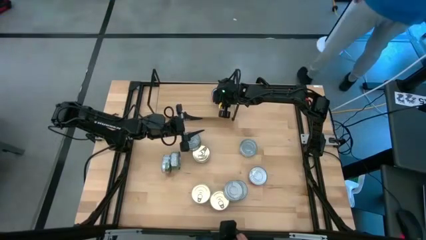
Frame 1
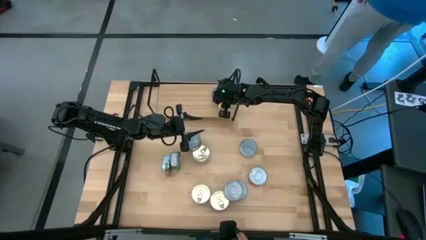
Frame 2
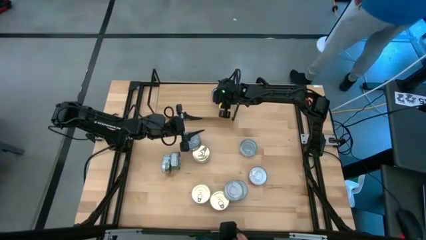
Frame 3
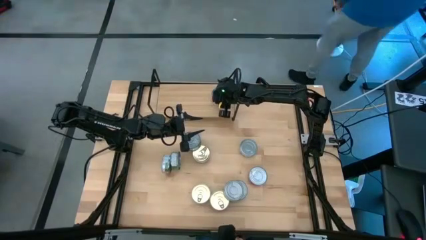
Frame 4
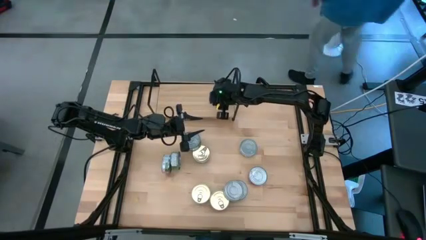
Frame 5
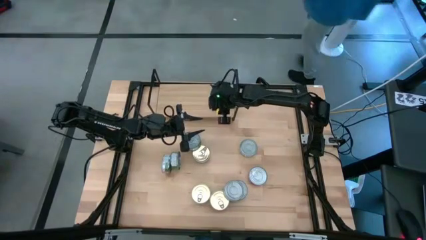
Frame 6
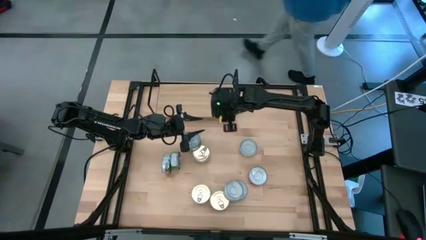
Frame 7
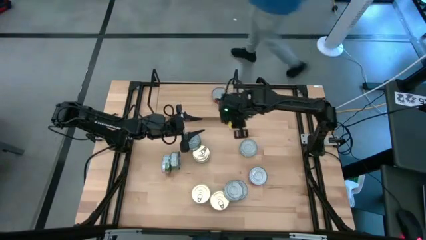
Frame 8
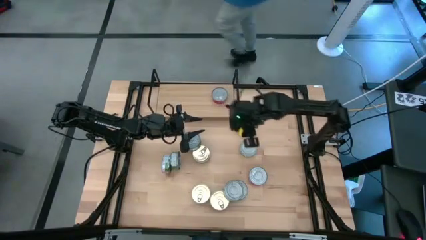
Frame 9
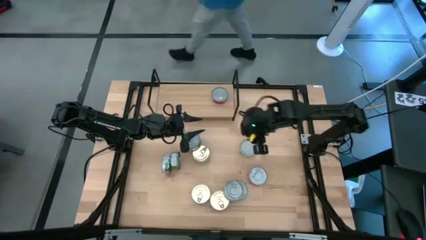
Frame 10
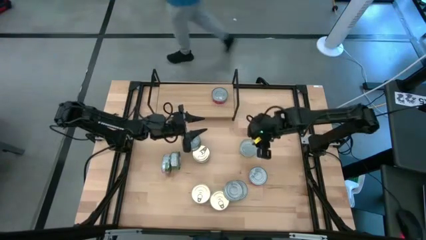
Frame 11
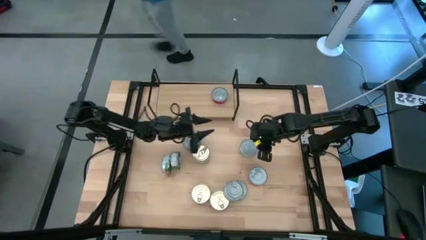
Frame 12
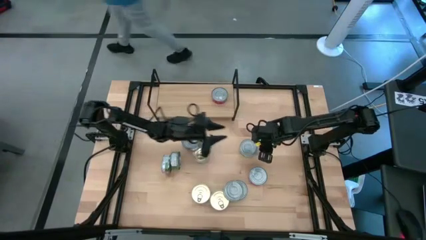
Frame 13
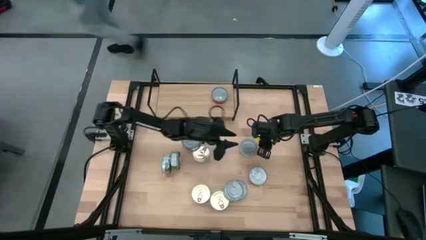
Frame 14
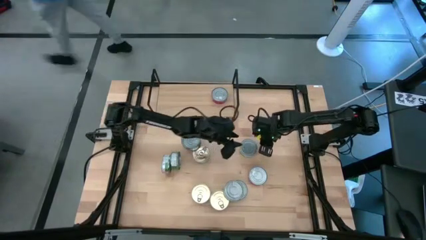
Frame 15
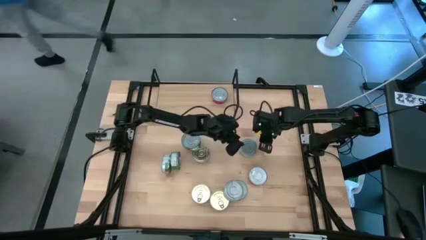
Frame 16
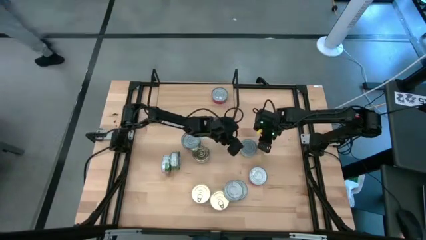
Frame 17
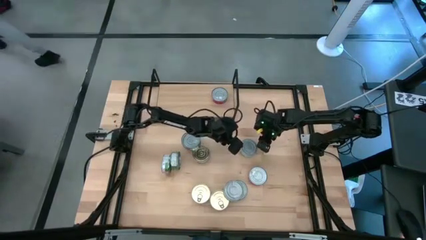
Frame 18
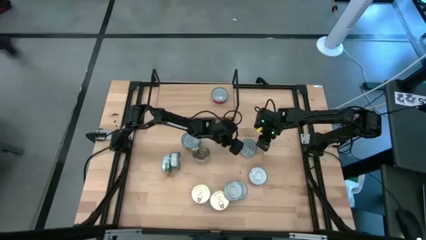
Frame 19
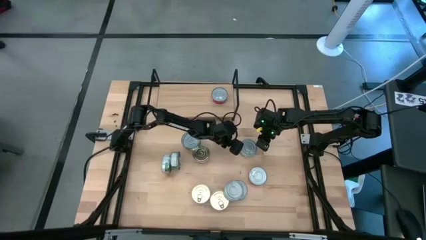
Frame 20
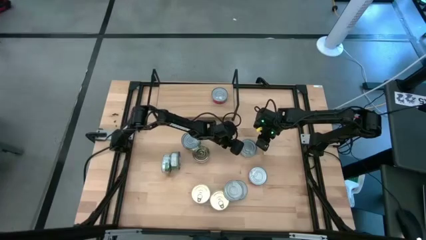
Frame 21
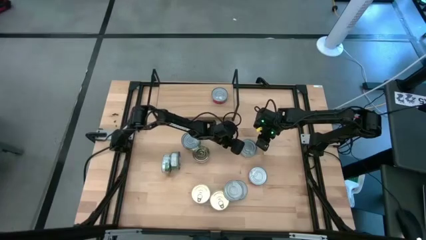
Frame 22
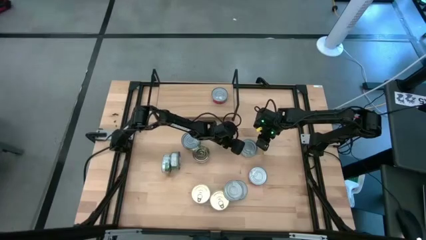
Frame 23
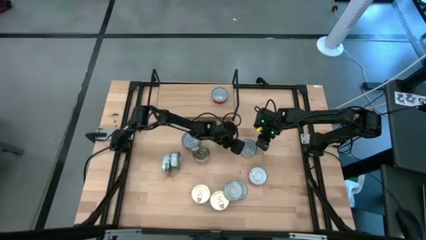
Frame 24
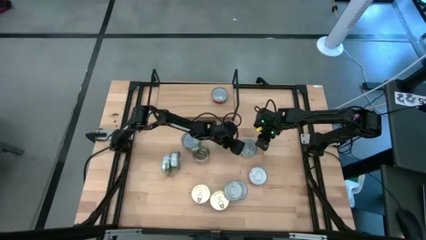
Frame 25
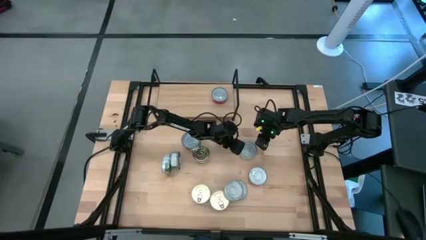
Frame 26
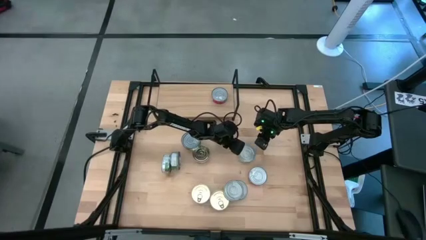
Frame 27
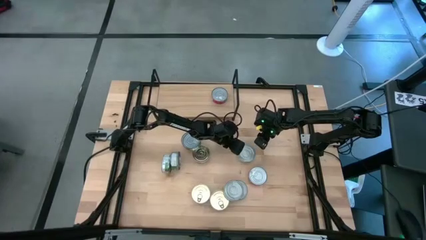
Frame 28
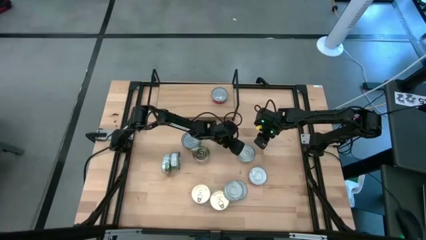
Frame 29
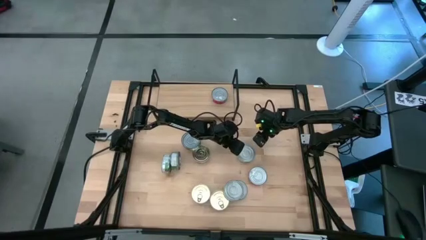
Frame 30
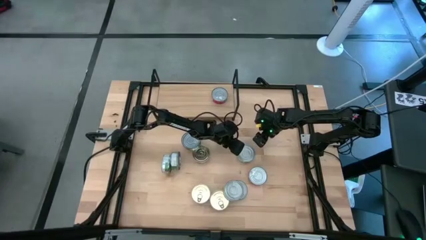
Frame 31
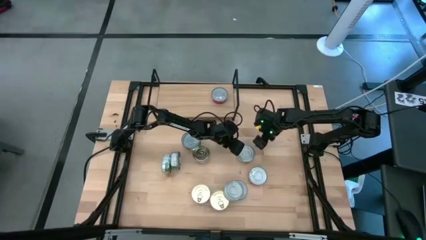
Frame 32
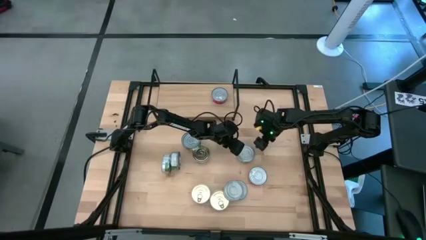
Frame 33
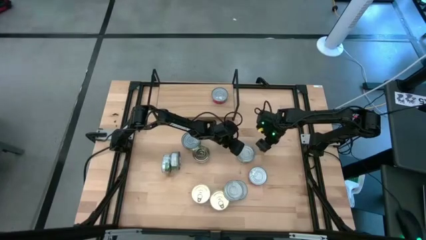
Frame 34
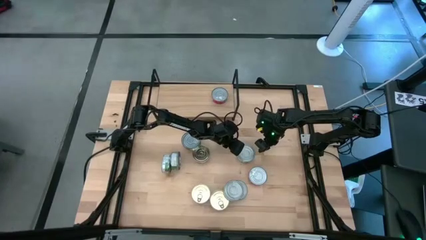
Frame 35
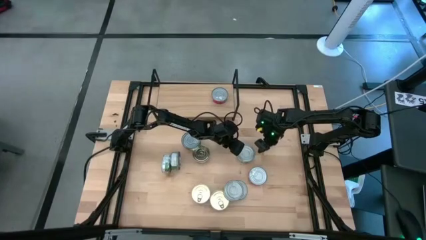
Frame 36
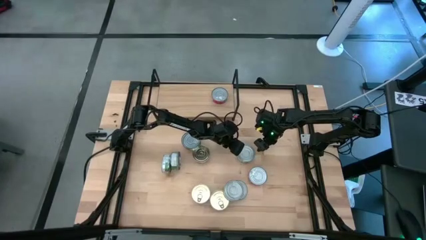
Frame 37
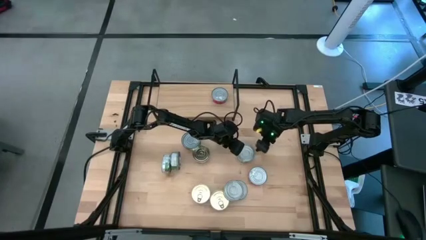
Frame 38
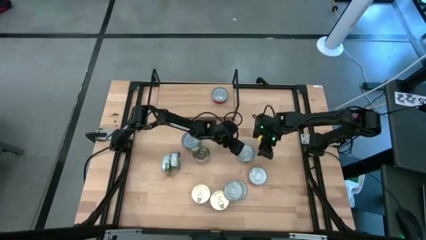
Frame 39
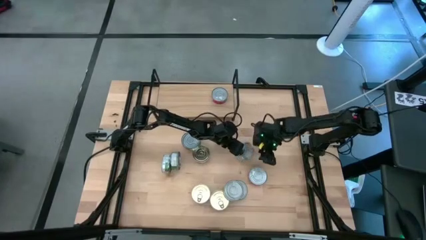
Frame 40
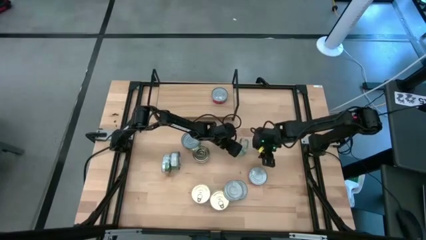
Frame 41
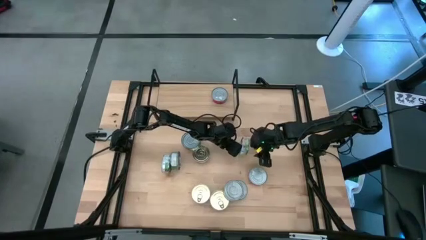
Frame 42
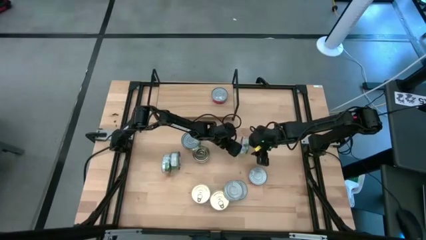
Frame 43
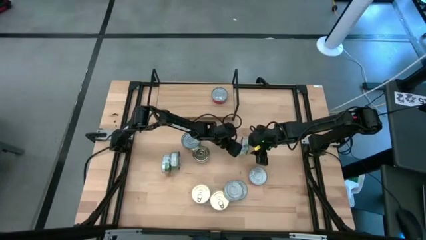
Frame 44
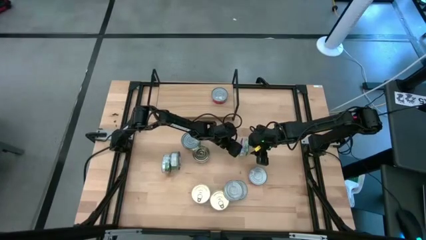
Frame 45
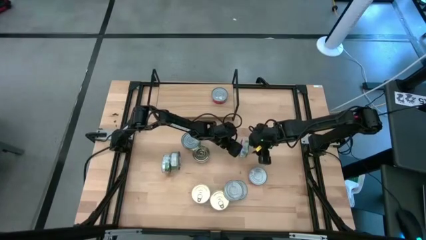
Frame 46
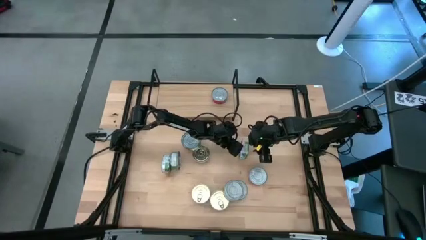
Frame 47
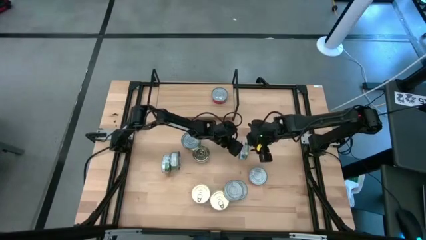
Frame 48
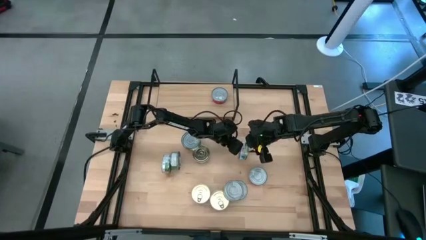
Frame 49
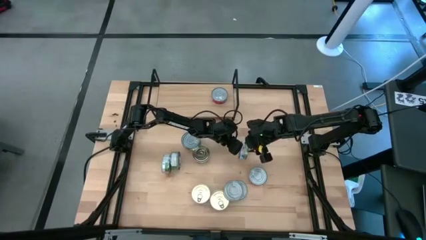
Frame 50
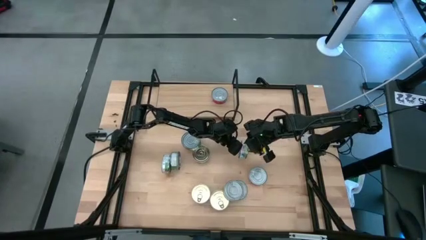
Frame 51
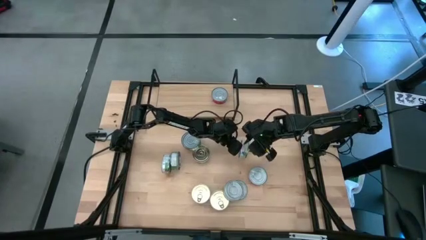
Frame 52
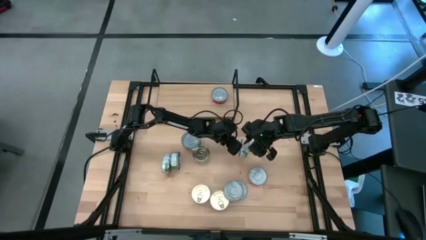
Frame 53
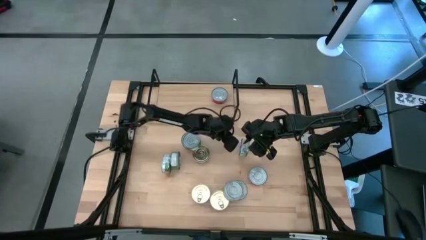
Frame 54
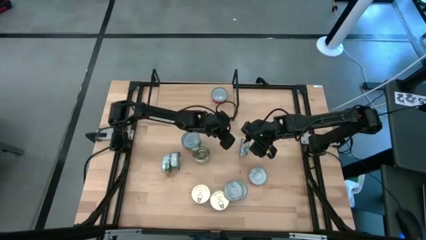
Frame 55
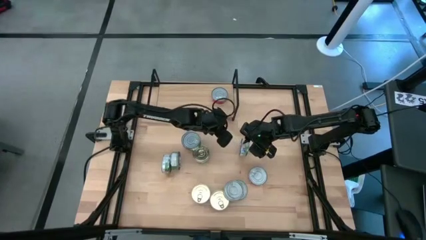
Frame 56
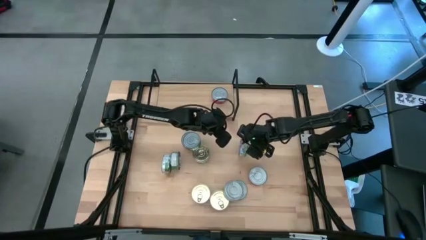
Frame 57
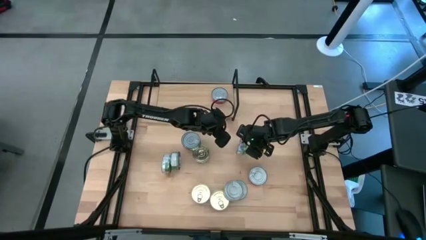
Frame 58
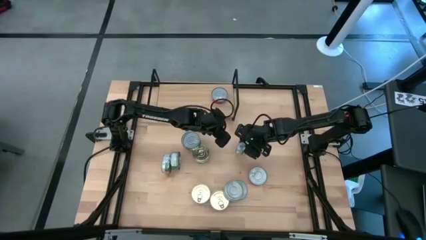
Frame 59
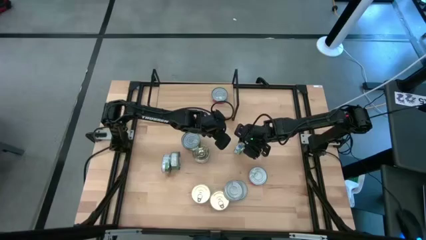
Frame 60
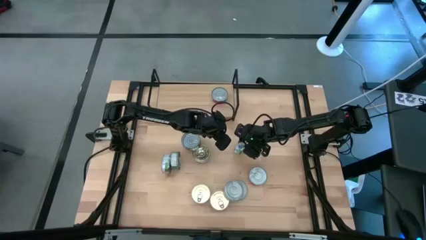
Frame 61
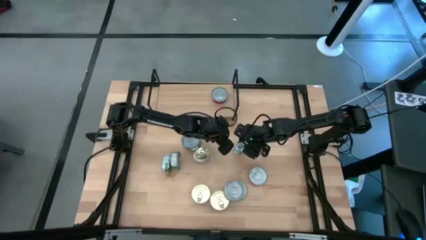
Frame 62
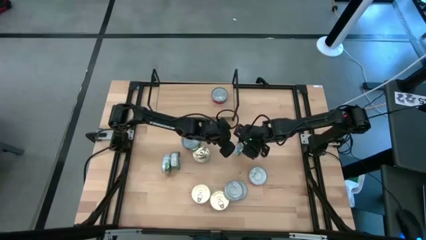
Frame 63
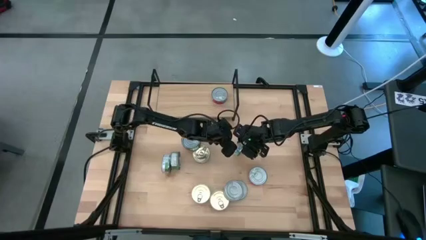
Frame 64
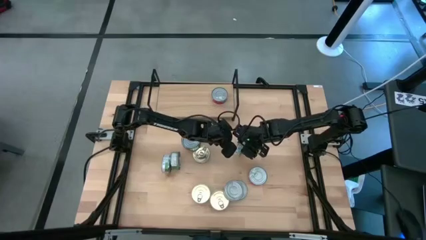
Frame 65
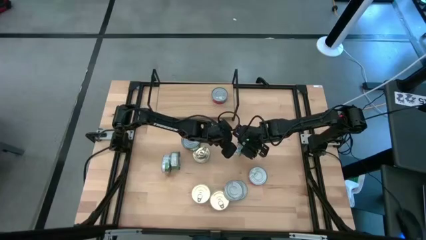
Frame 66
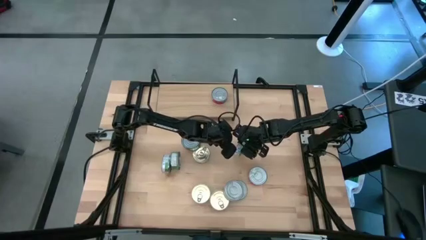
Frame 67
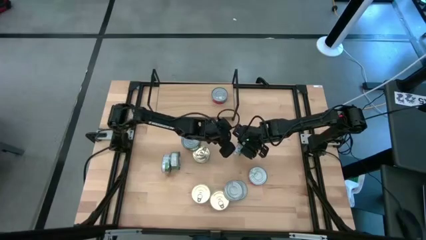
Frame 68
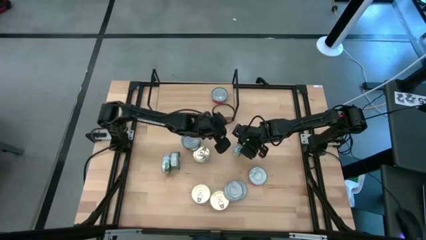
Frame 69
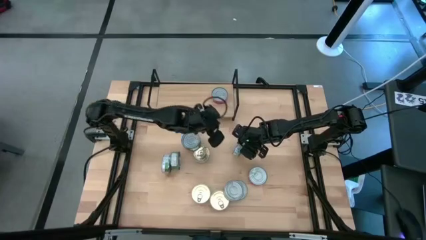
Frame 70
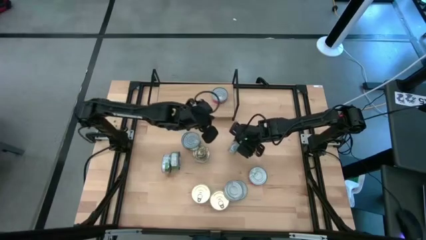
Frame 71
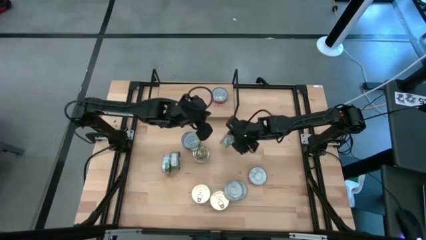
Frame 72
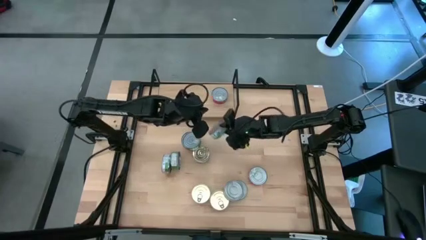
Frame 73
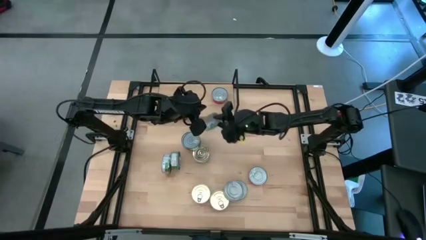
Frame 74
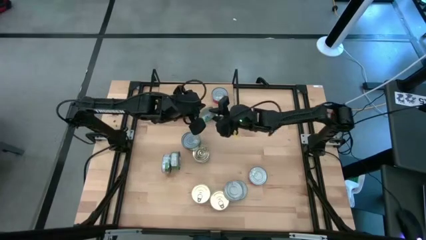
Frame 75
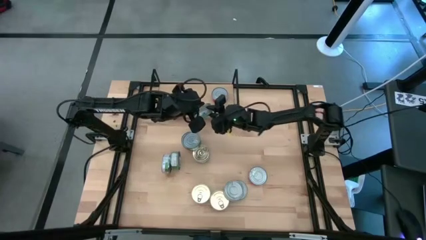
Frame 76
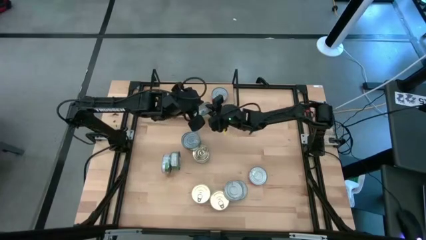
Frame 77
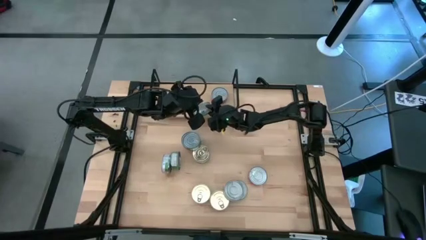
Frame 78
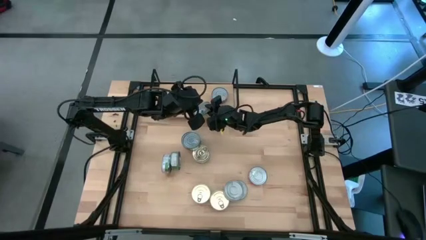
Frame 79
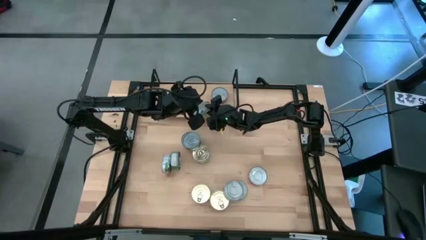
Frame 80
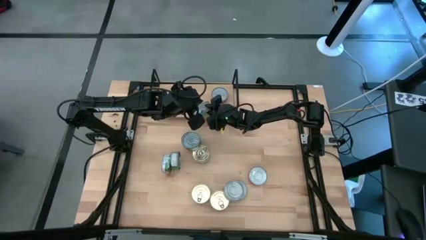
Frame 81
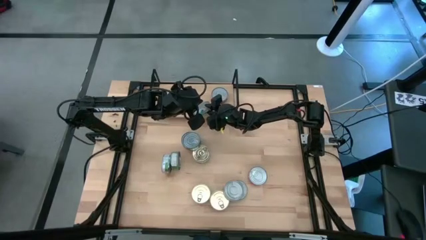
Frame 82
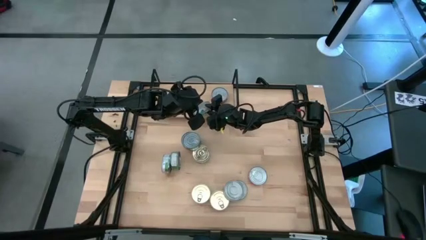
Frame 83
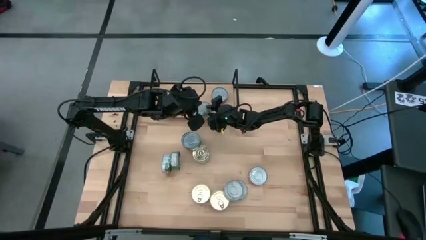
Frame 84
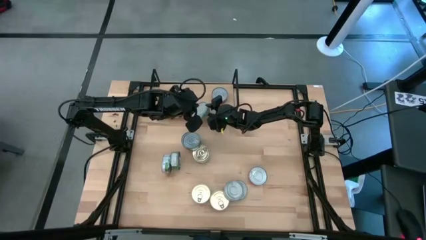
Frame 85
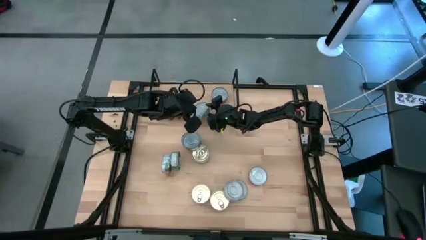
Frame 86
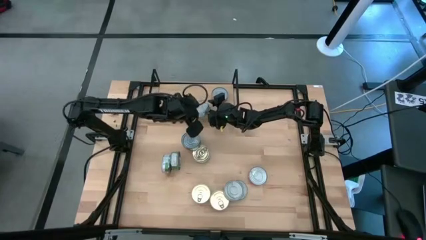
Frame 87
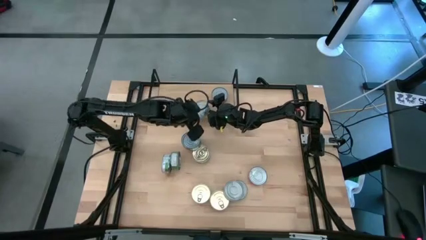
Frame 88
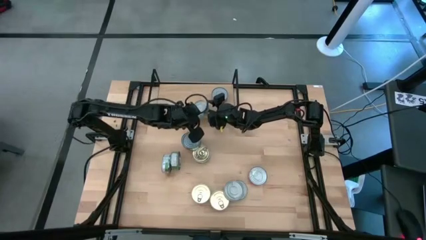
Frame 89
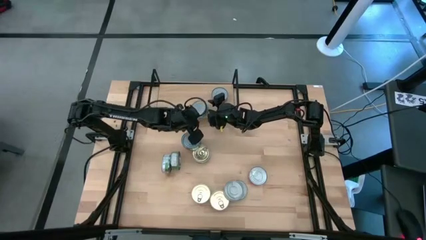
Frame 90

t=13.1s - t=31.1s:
Task: Stack canned seafood by type on shelf
Put the green white tuna can on the shelf
